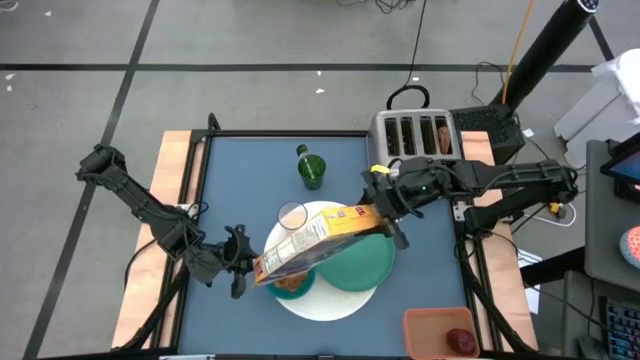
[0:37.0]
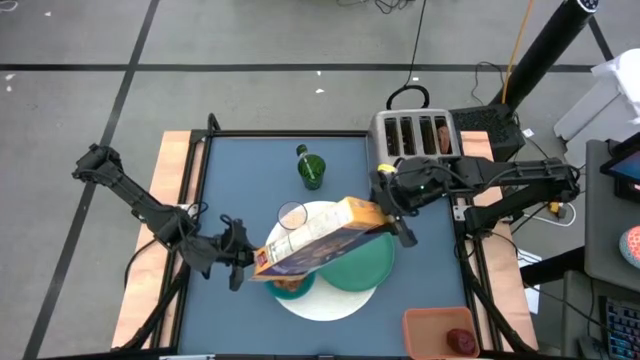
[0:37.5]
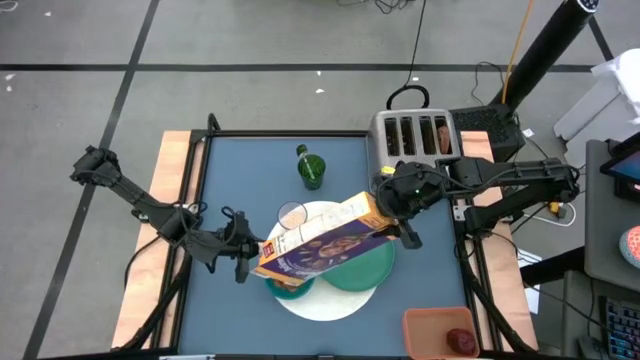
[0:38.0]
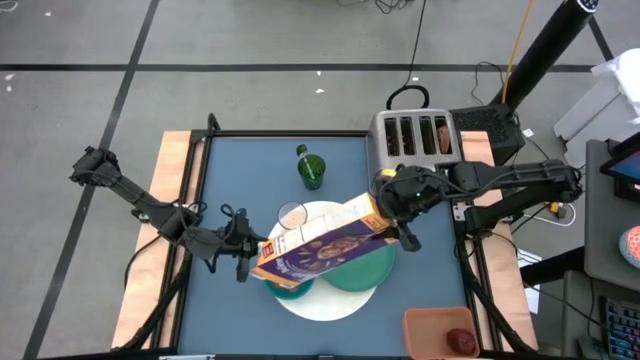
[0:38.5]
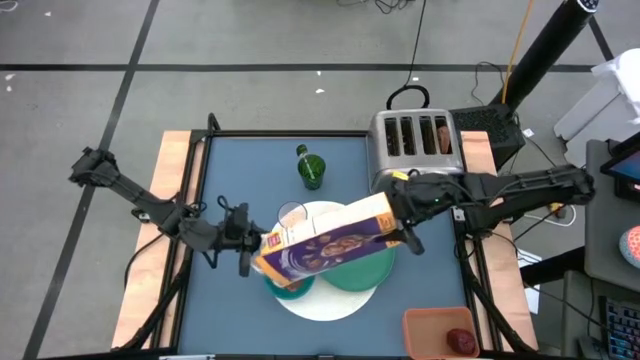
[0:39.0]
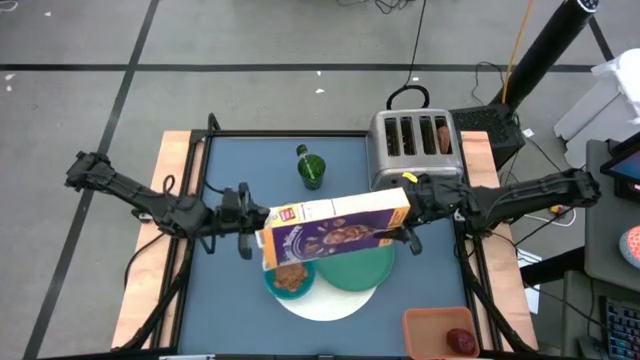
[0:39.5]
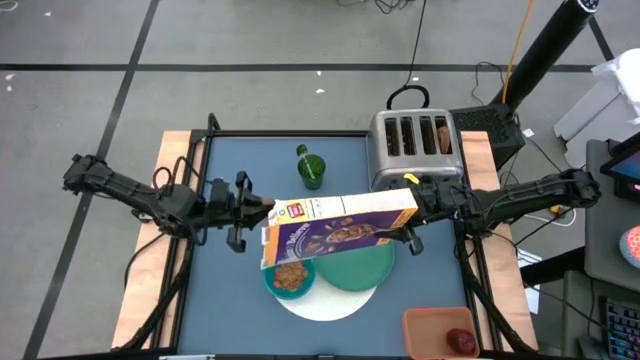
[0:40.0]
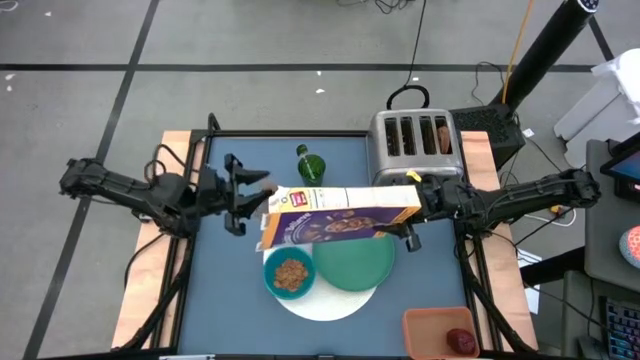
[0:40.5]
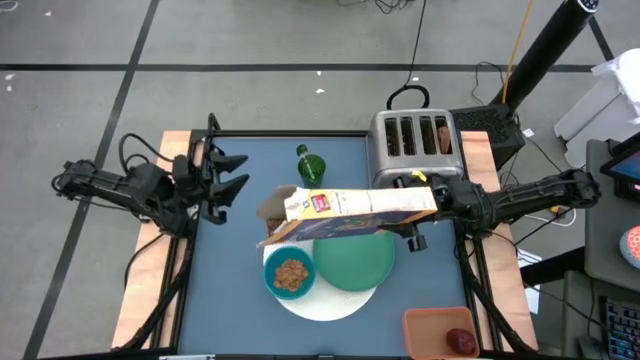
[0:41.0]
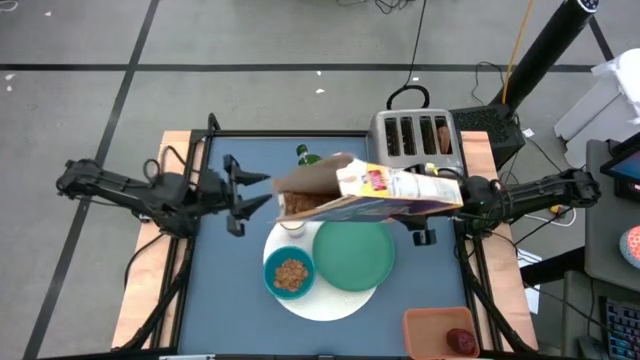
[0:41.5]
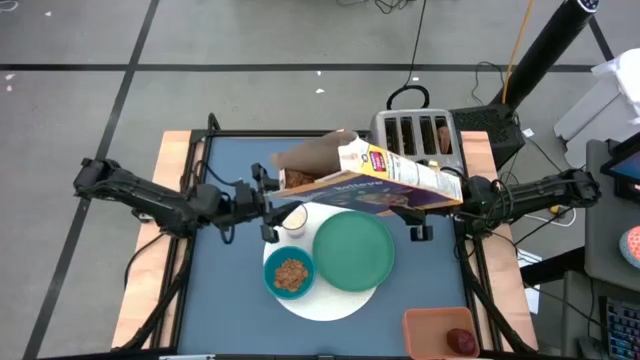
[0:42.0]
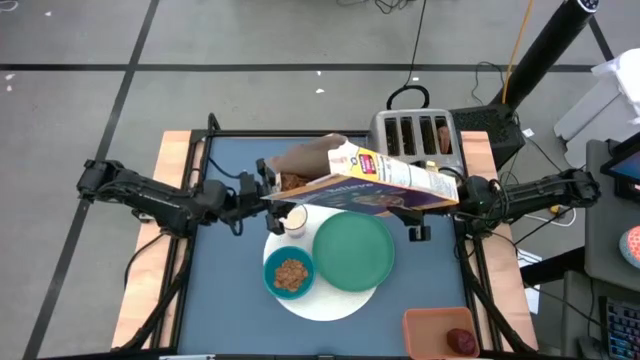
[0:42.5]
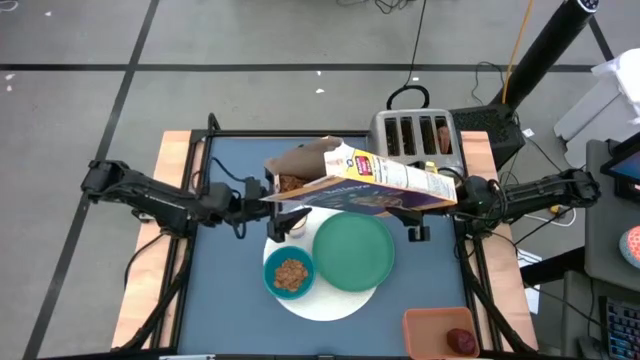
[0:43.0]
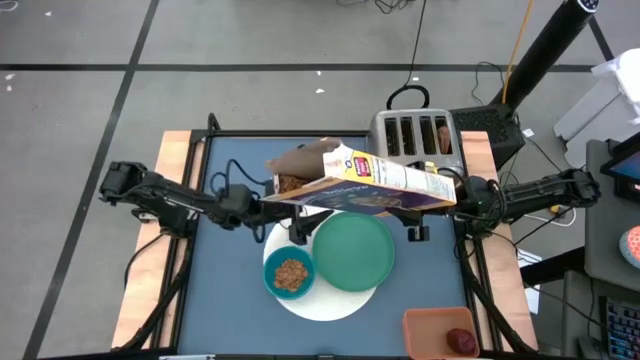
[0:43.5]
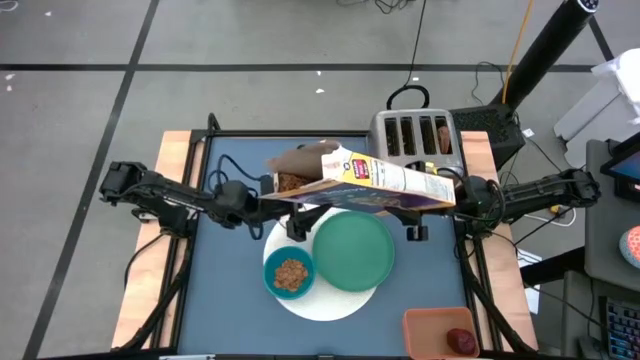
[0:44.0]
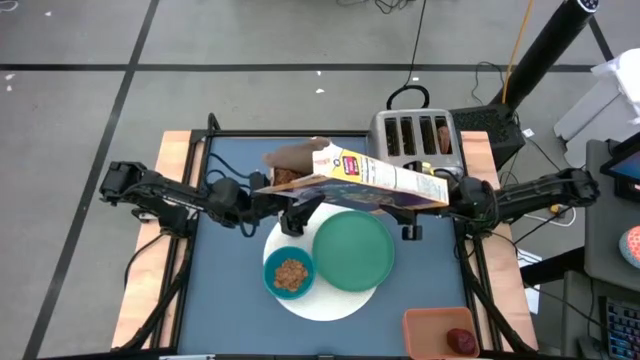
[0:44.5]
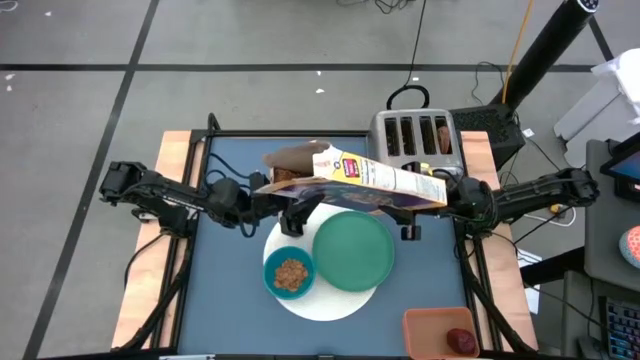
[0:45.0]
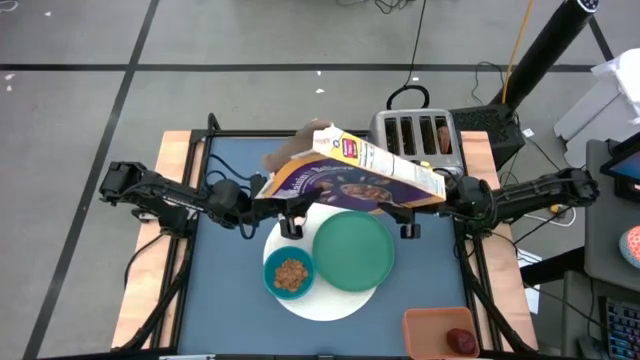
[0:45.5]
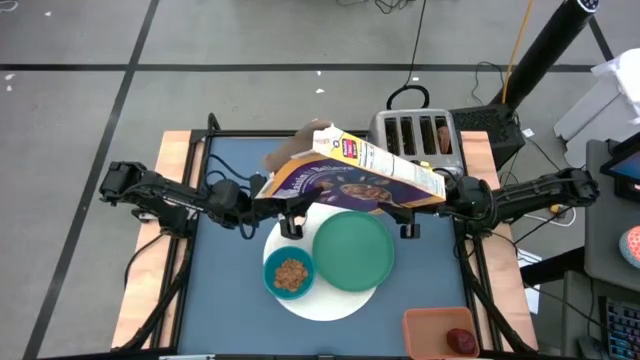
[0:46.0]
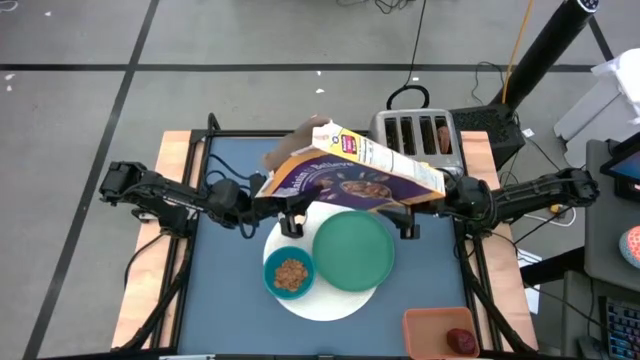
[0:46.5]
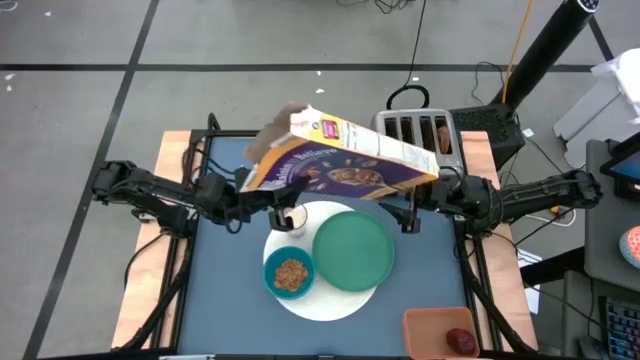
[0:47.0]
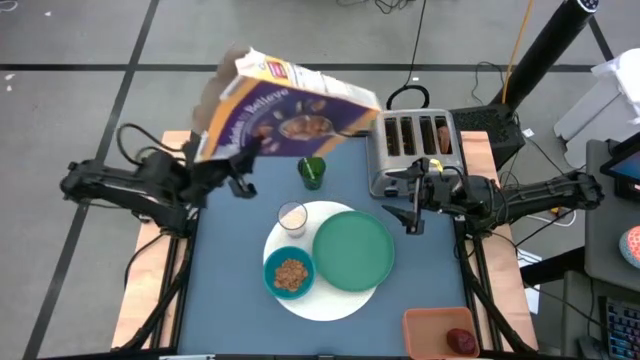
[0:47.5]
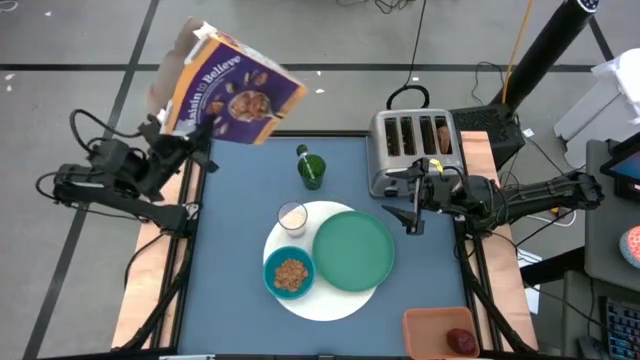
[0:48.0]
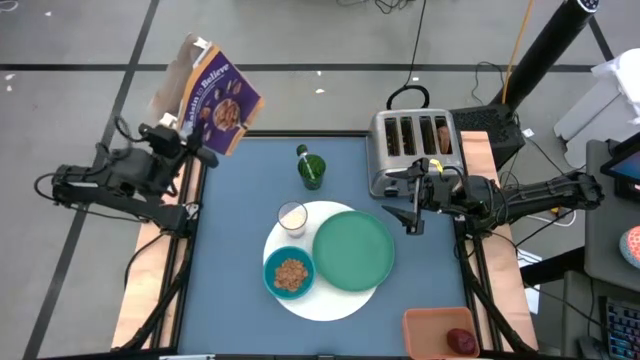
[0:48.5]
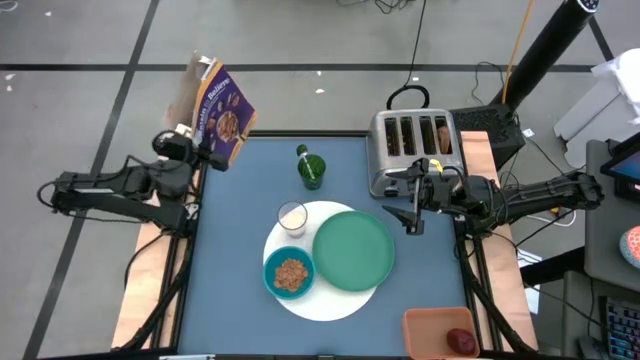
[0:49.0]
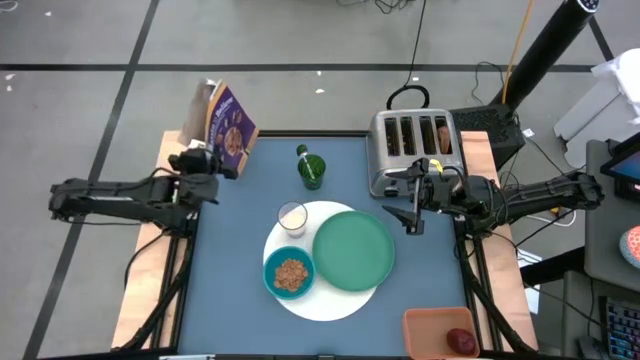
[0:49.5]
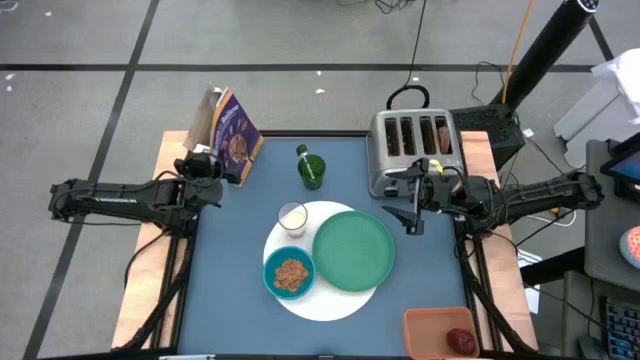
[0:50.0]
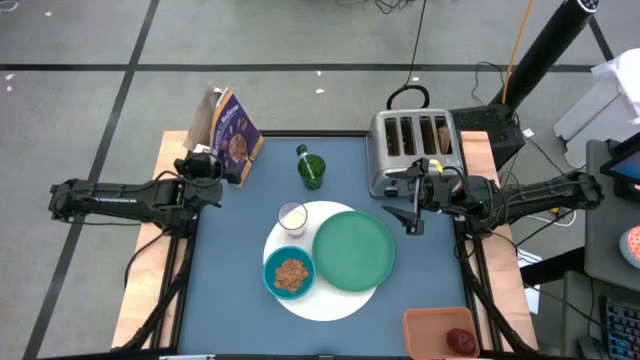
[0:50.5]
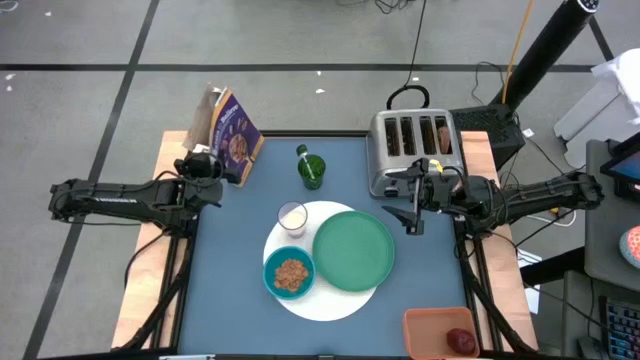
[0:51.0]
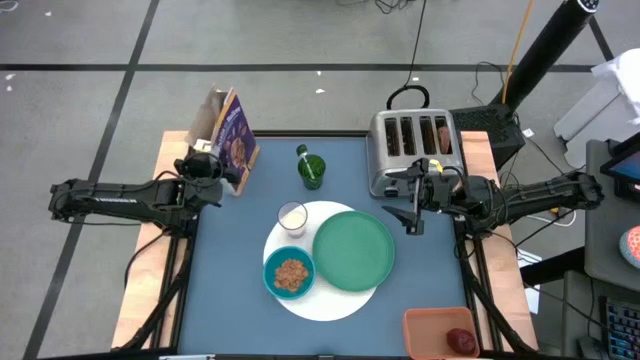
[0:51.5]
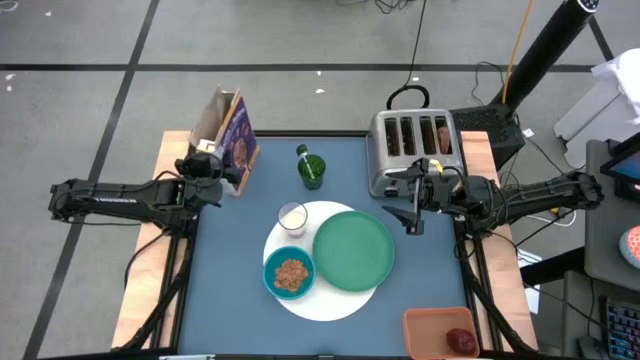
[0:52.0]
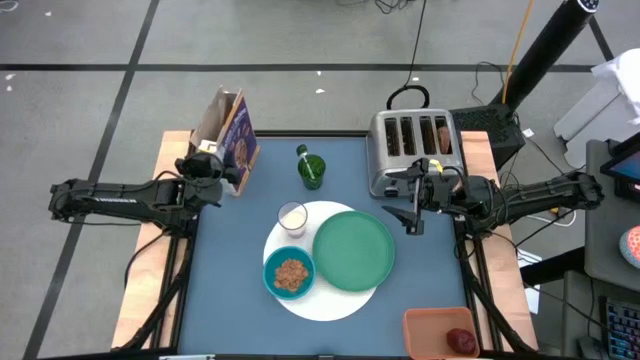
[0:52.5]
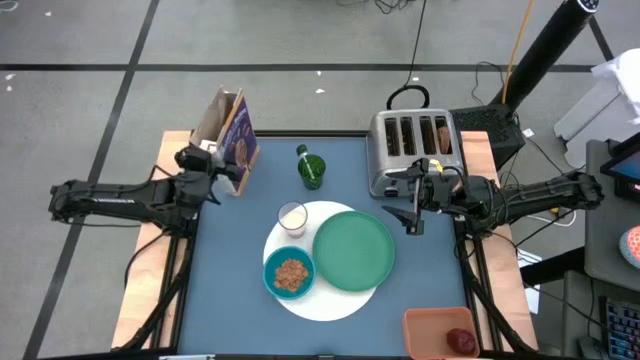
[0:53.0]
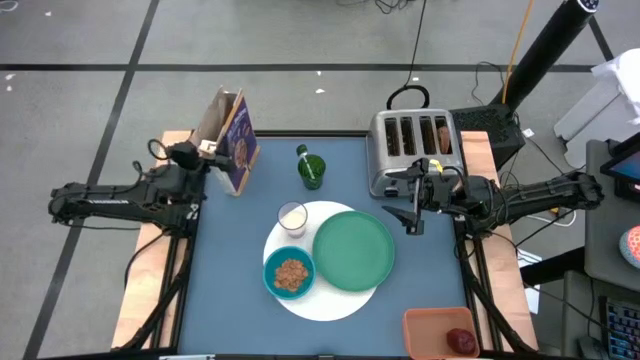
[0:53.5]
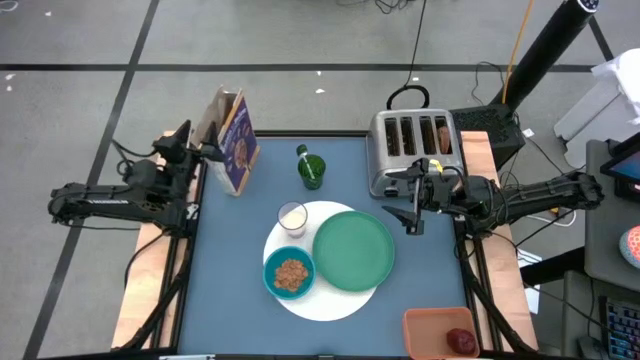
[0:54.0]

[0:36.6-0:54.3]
Task: Arrange a breakfast setting
Pour the cereal into the blue bowl from the cereal box

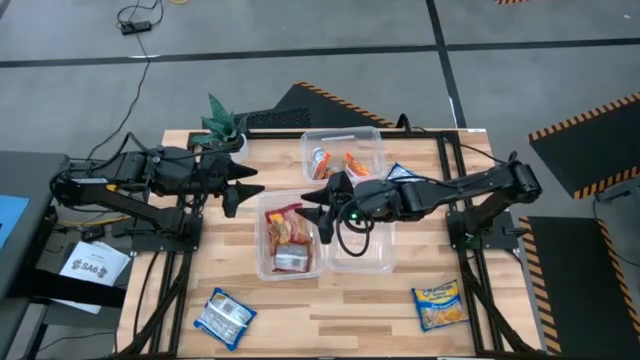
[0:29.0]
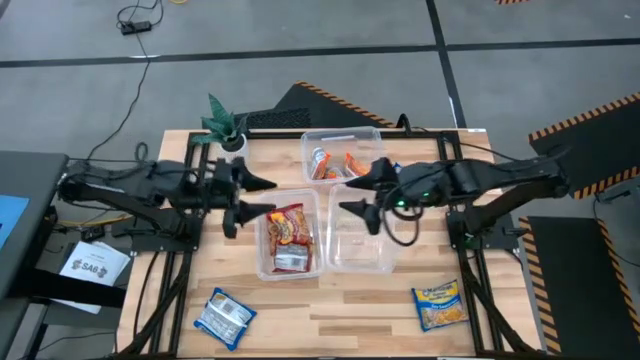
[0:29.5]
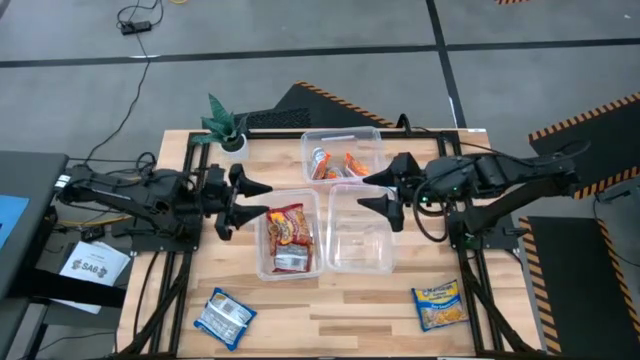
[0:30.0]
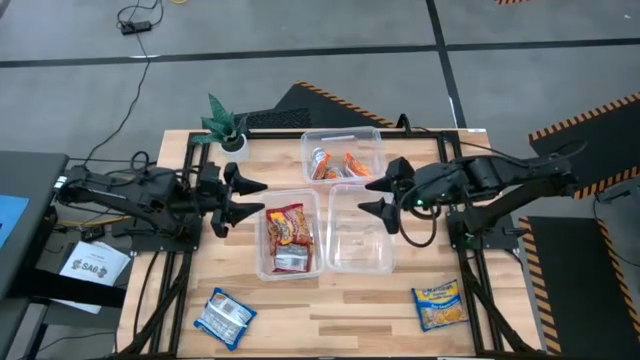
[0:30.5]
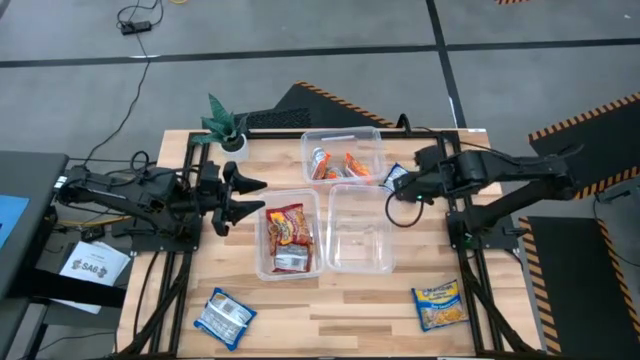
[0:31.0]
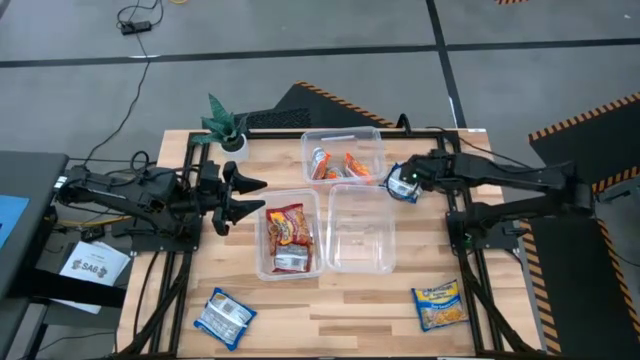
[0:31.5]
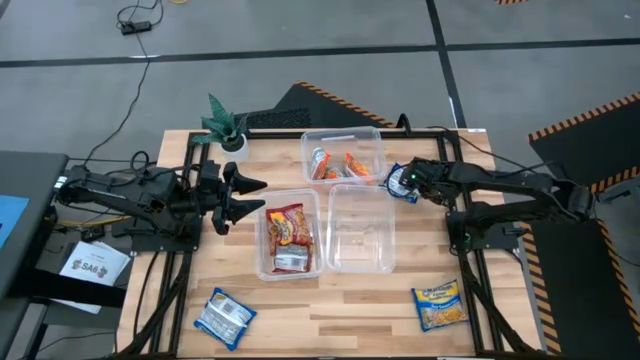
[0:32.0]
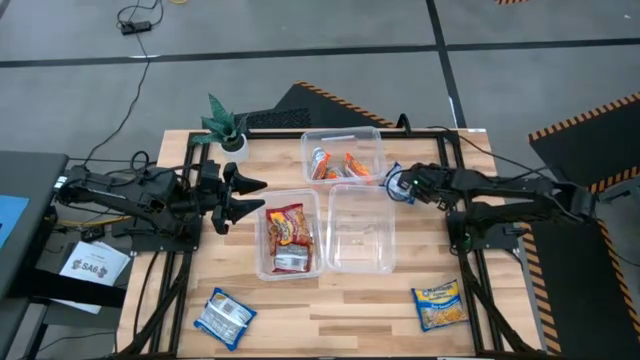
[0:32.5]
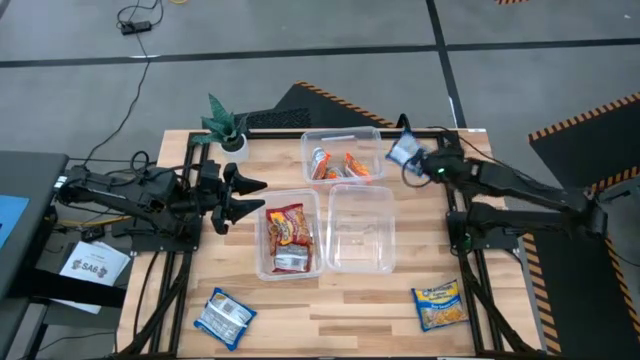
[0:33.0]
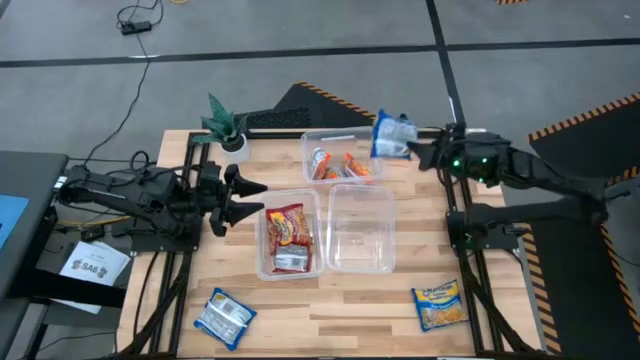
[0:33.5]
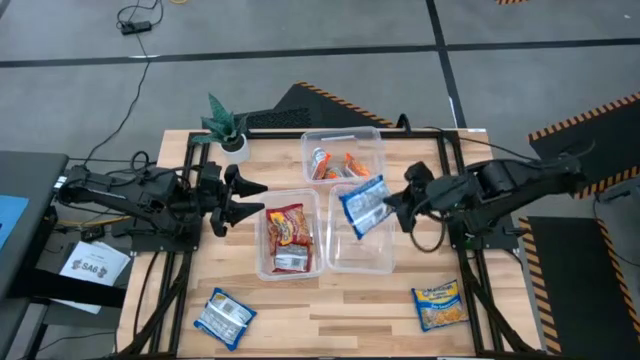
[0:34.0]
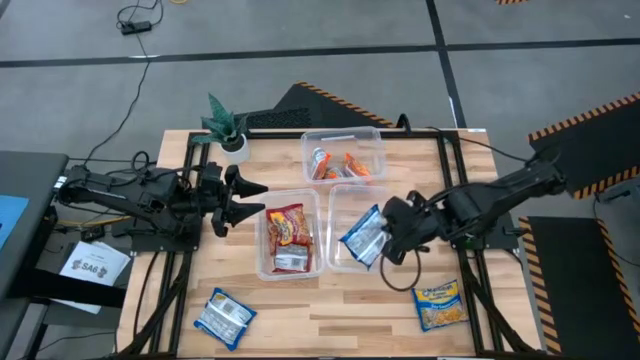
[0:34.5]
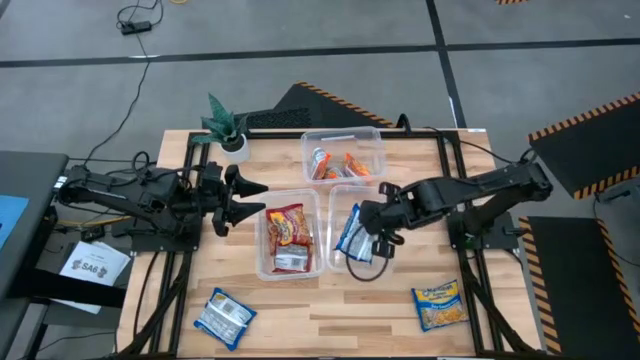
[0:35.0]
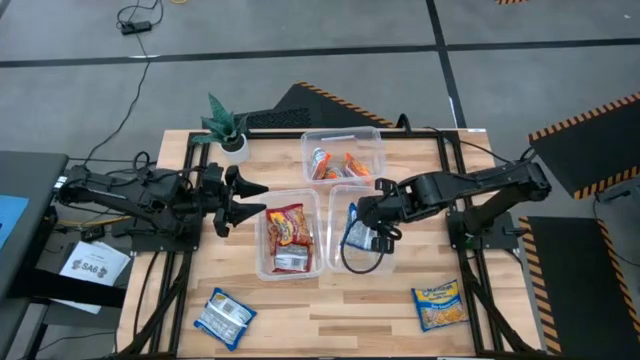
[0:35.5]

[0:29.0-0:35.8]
Task: Sort Maruchan noodles
Put the top right blue noodle pack into the bottom right transparent bin
